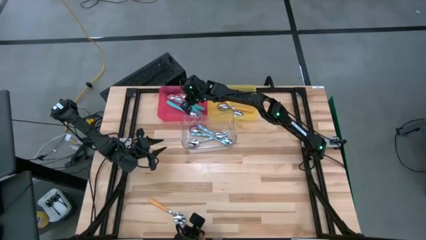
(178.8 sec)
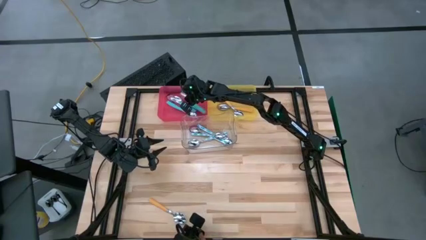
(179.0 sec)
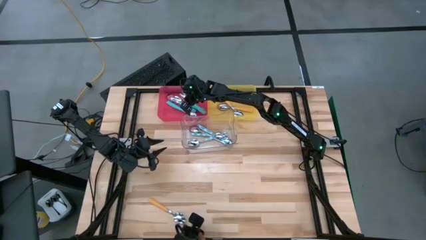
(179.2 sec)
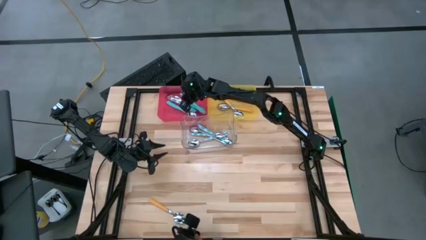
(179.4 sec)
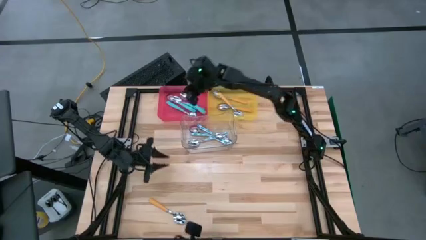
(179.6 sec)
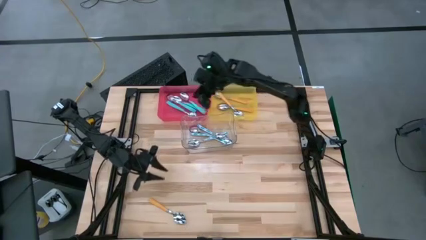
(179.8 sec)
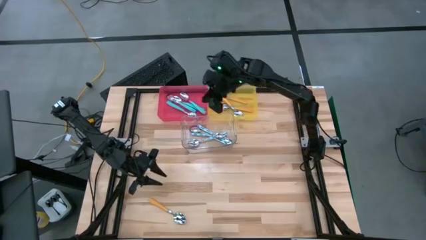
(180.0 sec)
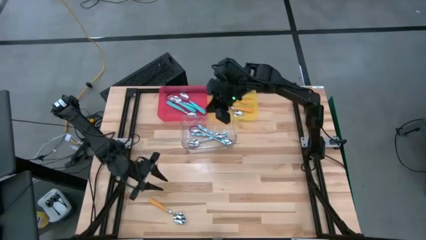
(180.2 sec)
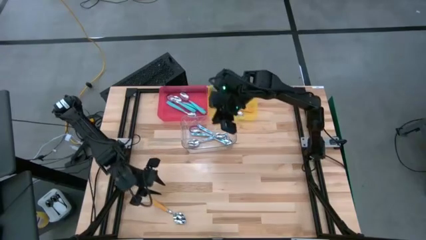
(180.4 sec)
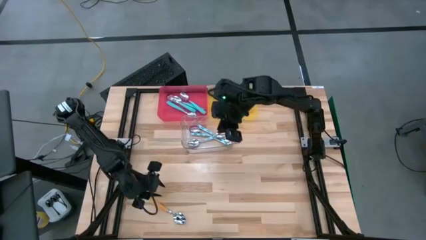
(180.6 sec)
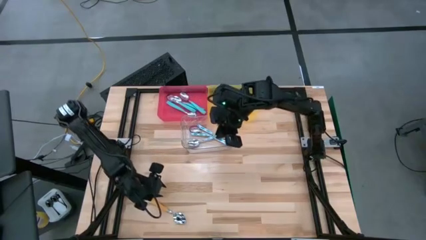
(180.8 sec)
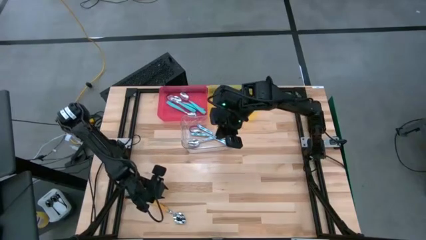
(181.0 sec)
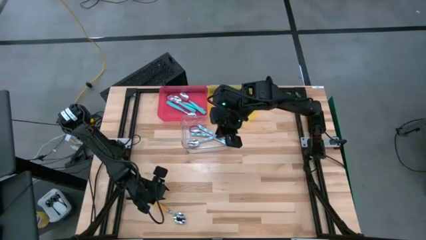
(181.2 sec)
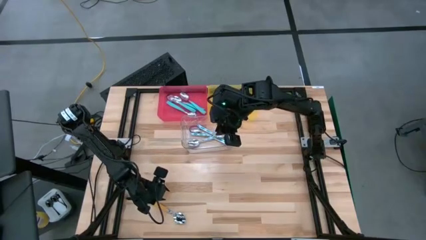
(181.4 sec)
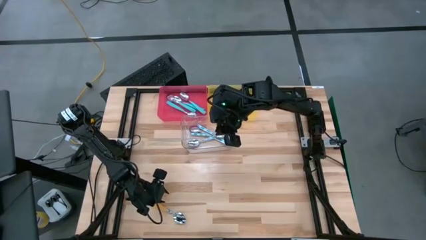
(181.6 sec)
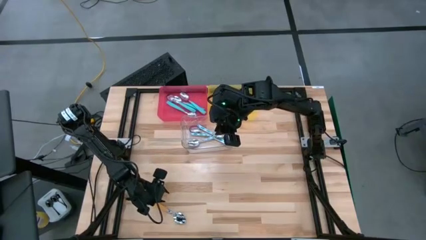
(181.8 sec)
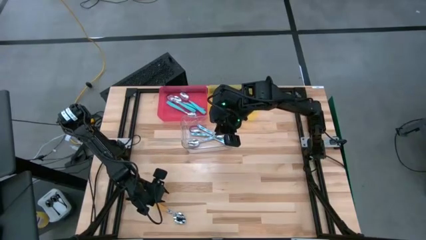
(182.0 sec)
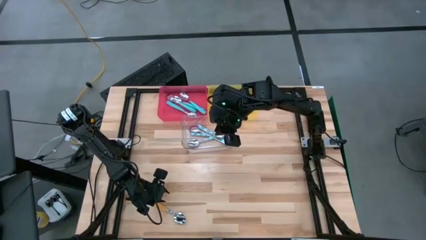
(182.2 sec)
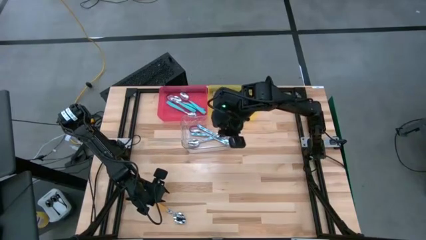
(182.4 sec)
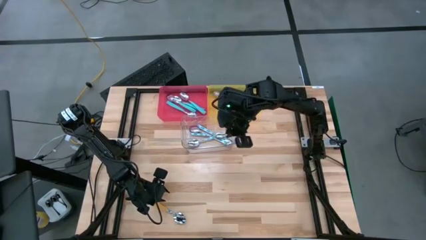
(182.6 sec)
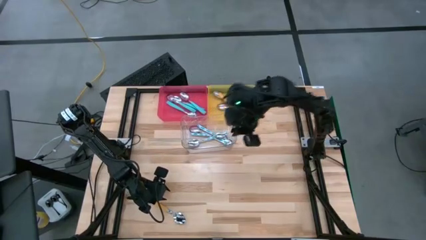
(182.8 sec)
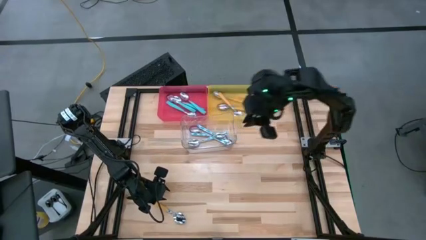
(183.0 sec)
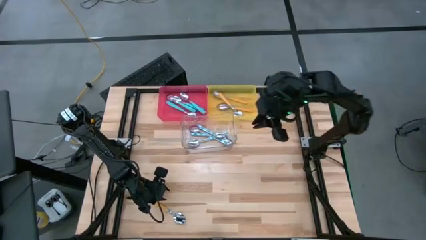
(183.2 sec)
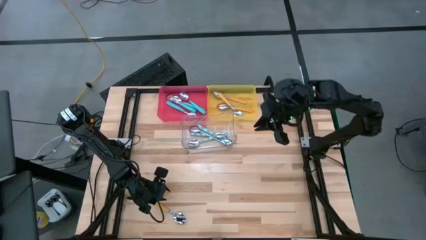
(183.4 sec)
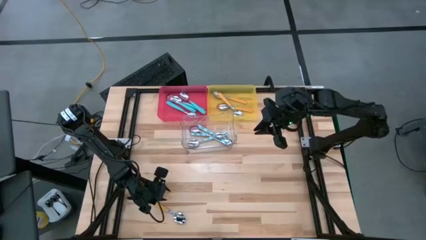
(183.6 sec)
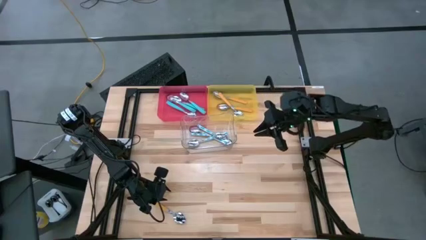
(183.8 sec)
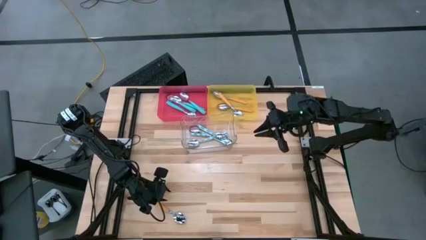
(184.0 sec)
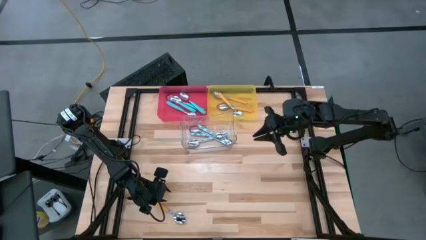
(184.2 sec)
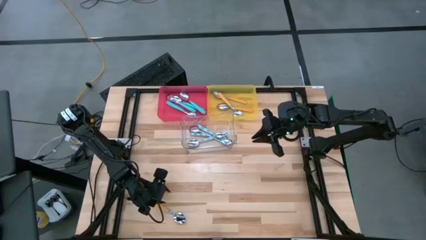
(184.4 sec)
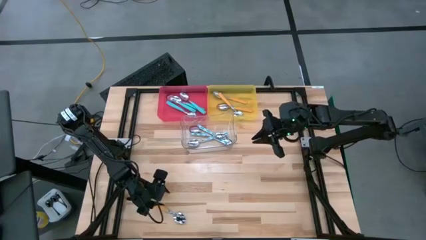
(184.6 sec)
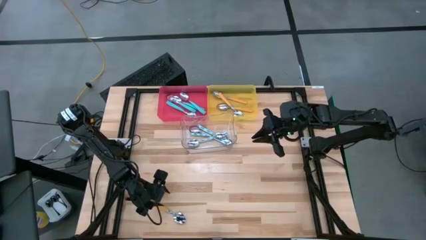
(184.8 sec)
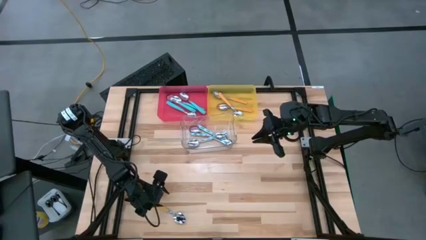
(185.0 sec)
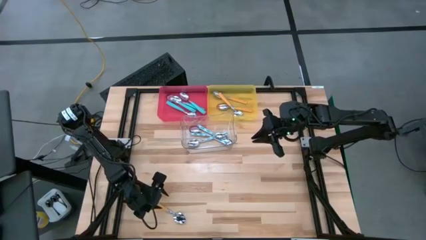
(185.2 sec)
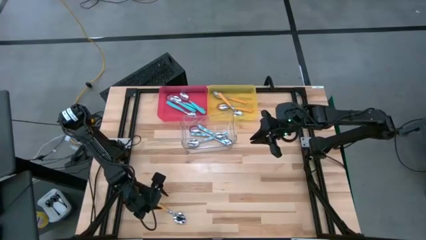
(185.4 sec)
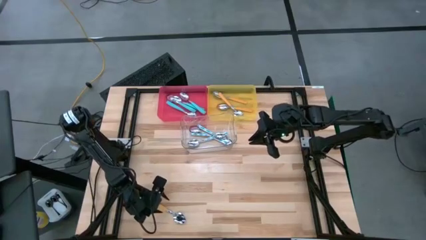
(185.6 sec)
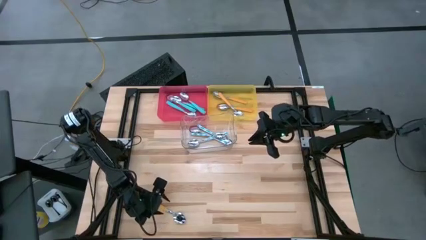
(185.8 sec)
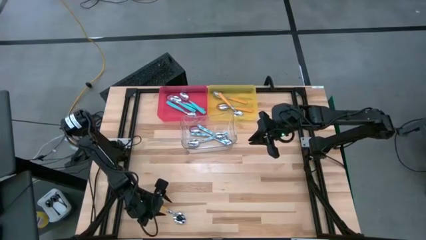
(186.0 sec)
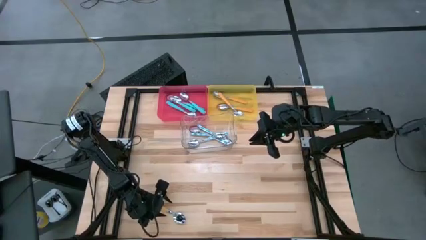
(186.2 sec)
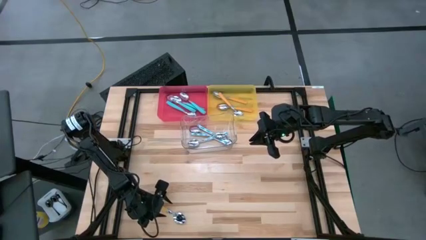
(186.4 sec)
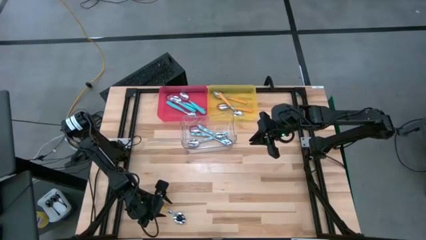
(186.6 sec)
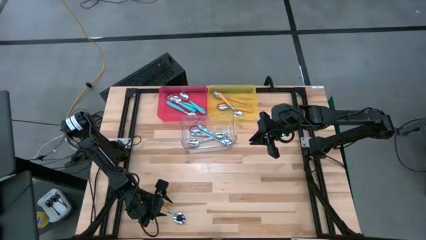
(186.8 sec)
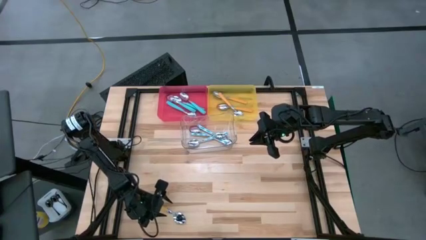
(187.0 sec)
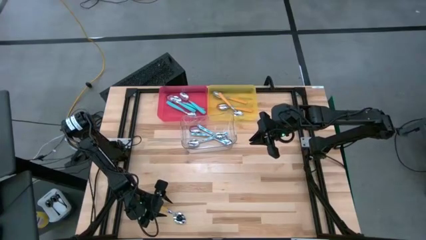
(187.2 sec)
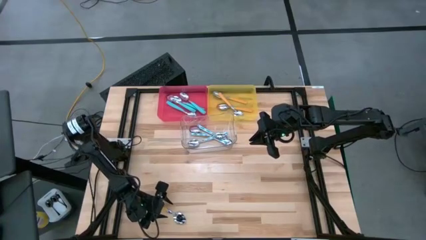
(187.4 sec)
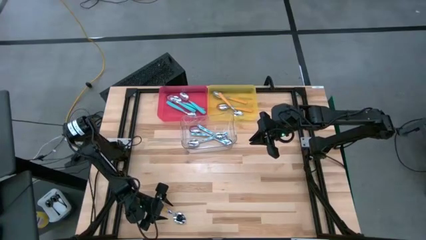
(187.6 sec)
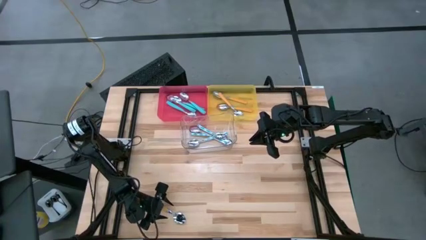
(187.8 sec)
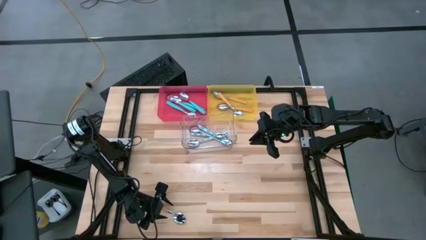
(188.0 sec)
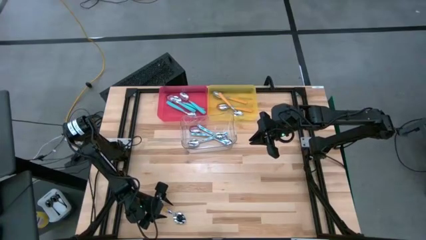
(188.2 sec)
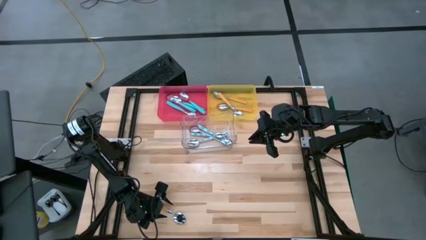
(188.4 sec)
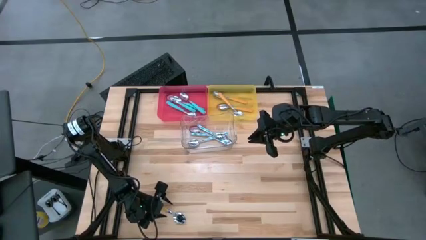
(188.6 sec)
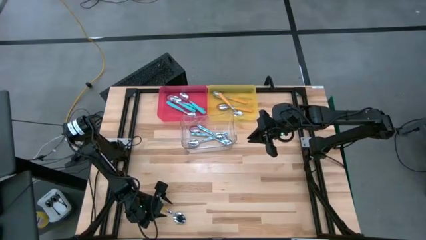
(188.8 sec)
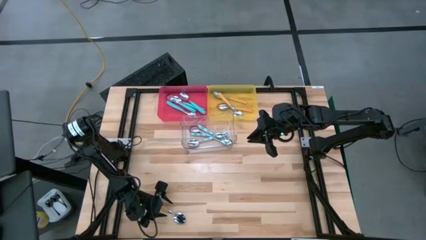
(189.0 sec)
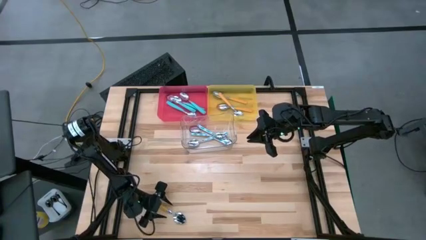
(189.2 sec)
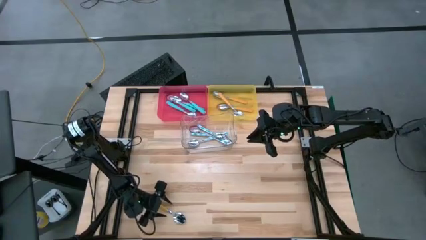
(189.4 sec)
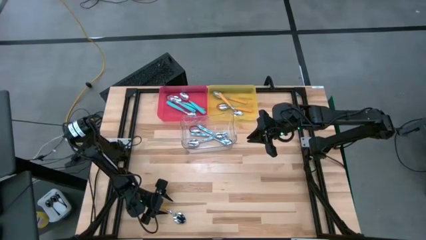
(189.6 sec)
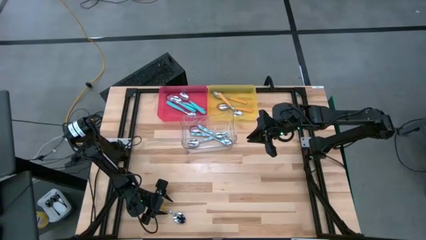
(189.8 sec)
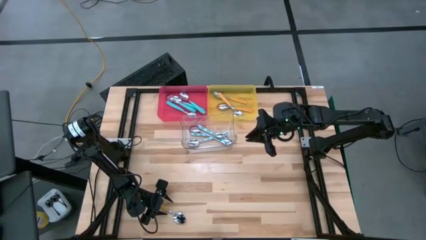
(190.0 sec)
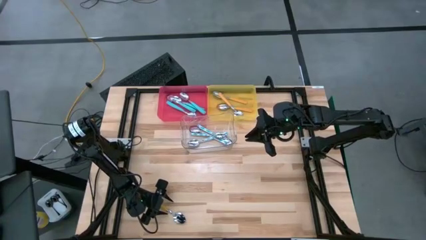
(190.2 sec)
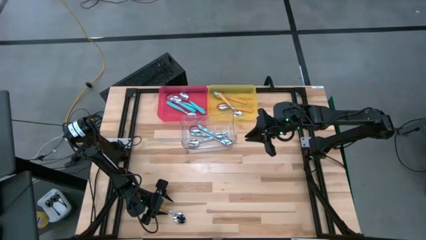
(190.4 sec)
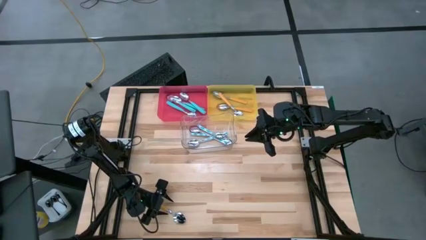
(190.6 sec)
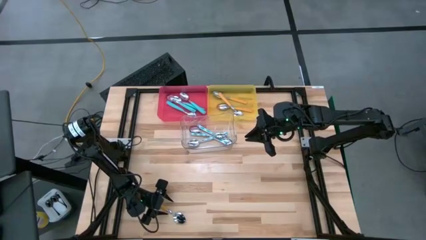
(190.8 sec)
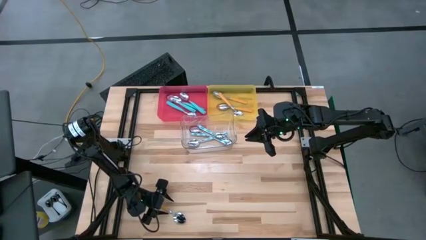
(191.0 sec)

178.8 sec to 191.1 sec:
Task: Sort silverware by color (type)
Put the yellow spoon into the yellow bin
